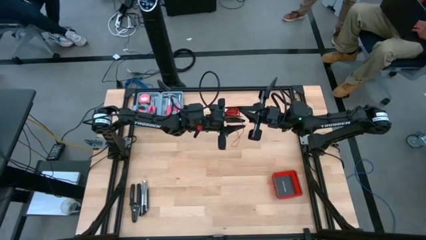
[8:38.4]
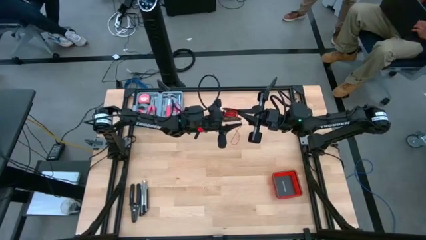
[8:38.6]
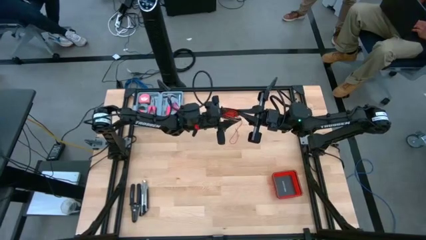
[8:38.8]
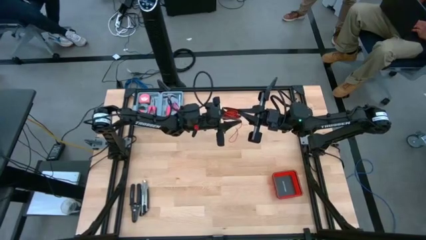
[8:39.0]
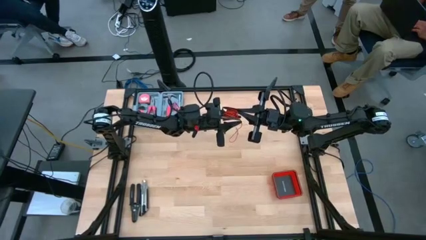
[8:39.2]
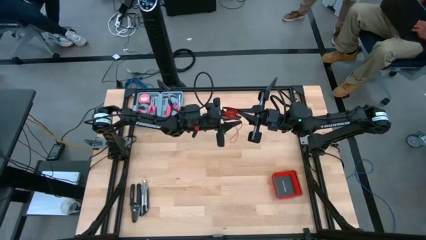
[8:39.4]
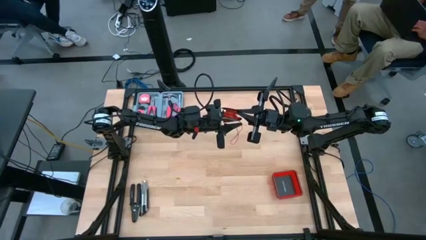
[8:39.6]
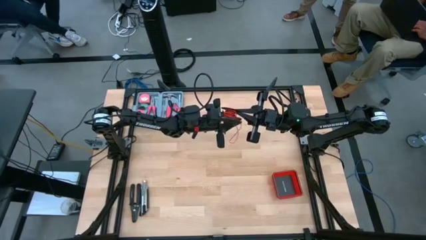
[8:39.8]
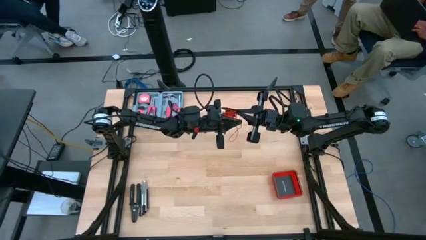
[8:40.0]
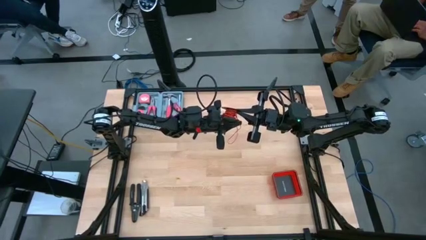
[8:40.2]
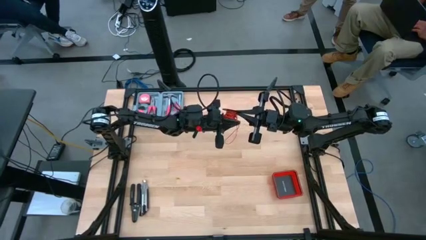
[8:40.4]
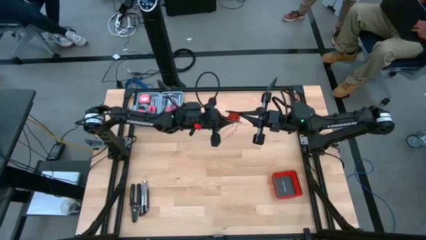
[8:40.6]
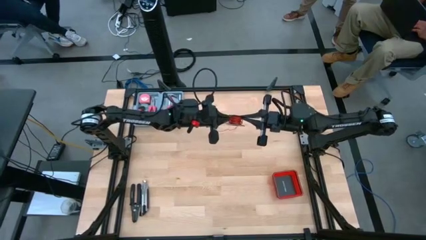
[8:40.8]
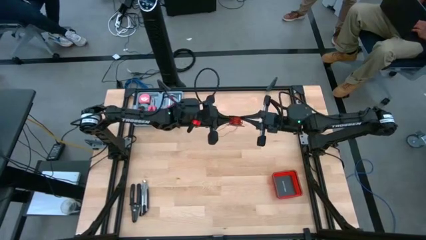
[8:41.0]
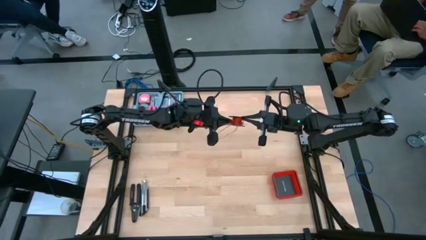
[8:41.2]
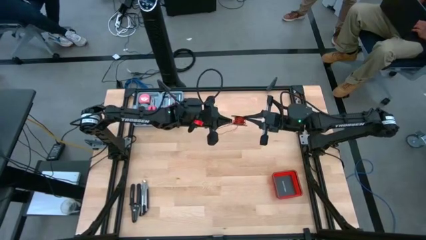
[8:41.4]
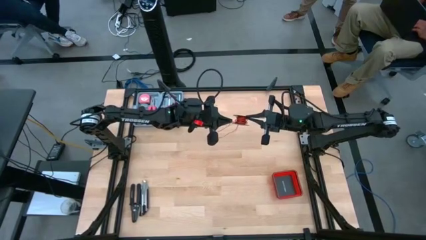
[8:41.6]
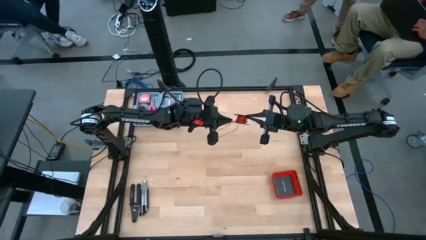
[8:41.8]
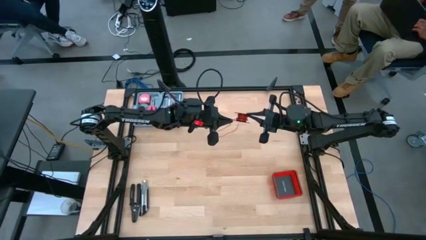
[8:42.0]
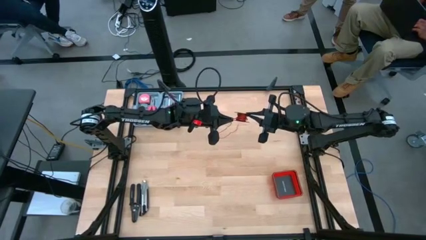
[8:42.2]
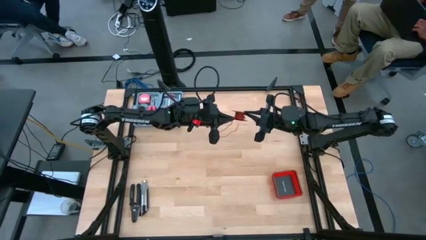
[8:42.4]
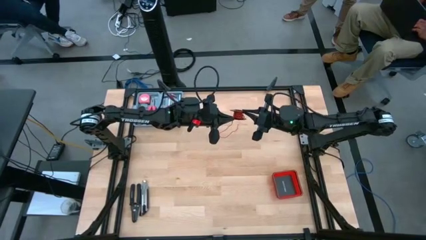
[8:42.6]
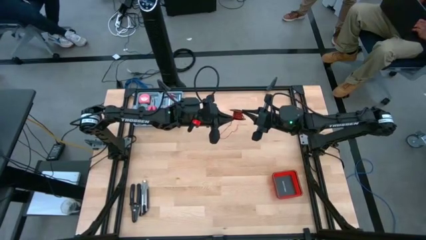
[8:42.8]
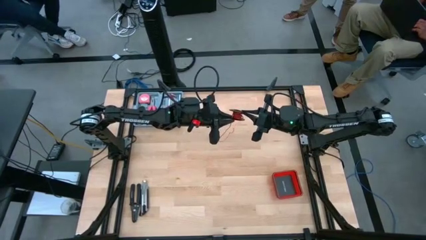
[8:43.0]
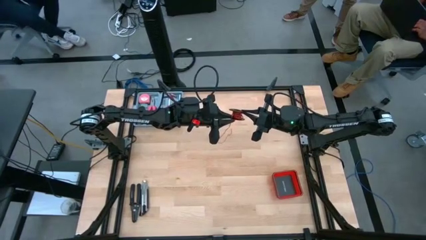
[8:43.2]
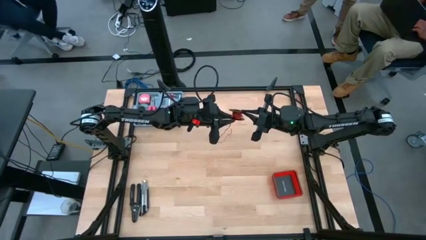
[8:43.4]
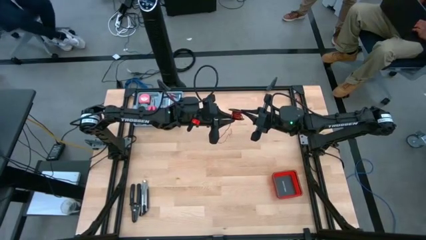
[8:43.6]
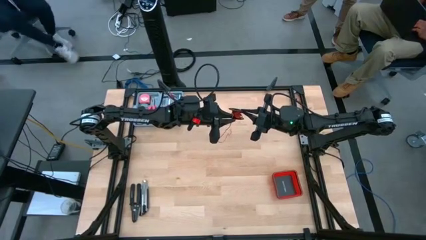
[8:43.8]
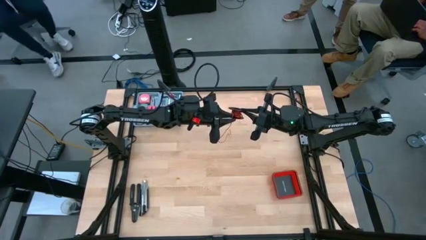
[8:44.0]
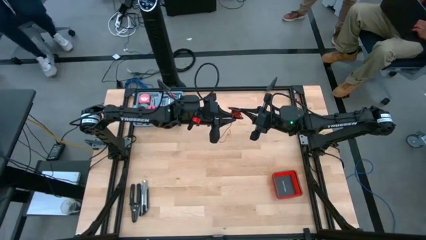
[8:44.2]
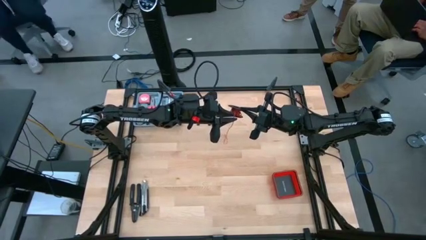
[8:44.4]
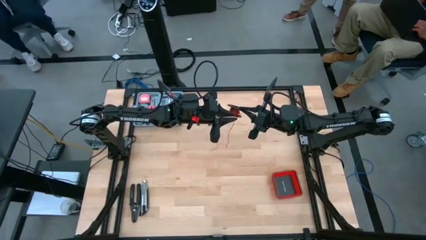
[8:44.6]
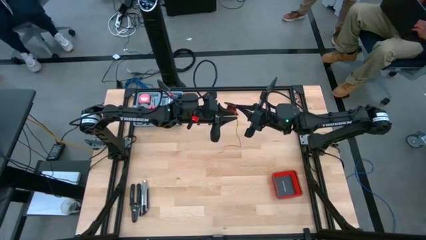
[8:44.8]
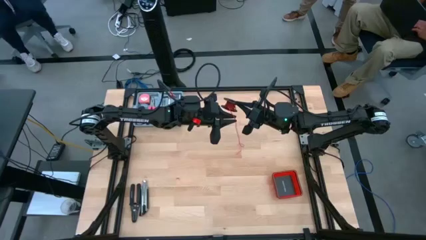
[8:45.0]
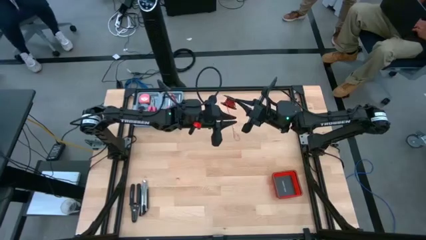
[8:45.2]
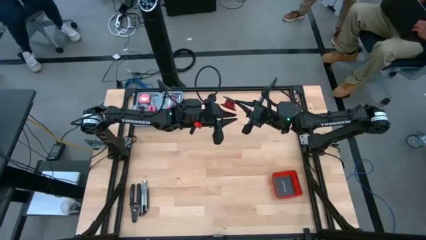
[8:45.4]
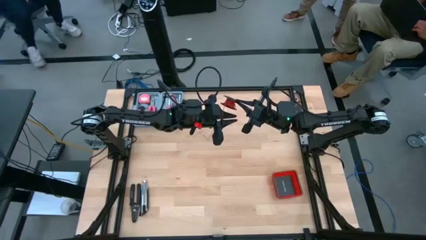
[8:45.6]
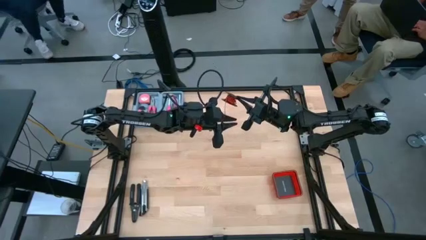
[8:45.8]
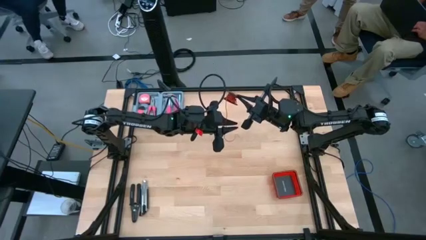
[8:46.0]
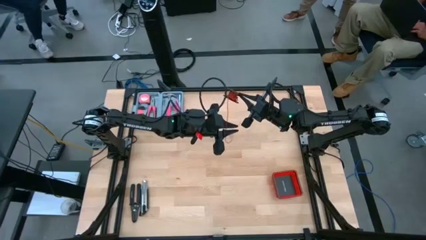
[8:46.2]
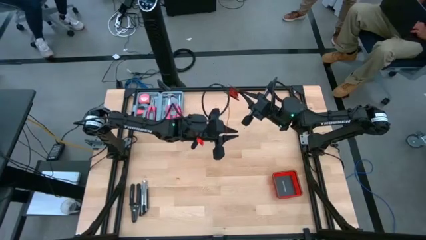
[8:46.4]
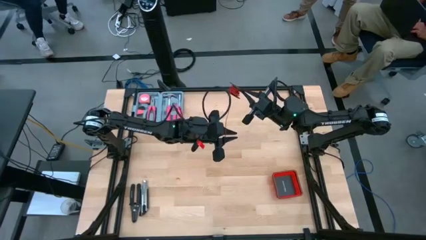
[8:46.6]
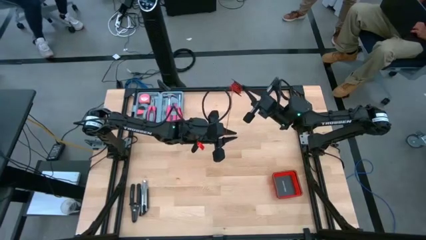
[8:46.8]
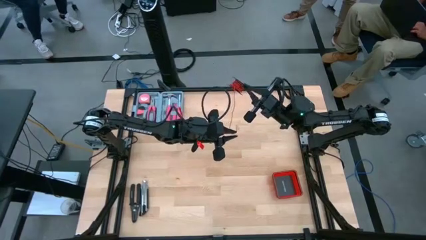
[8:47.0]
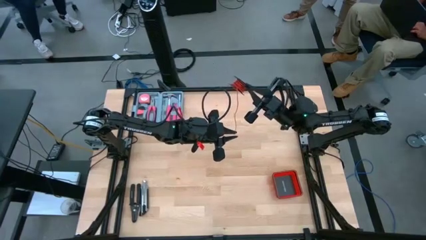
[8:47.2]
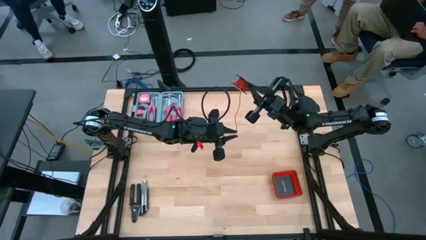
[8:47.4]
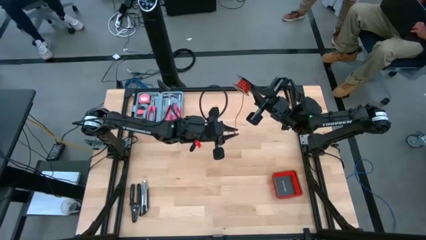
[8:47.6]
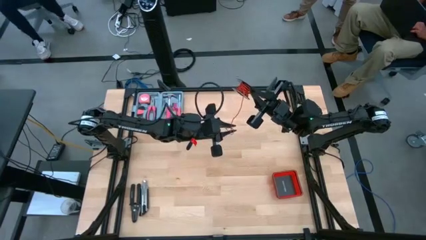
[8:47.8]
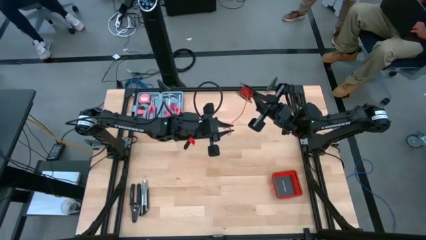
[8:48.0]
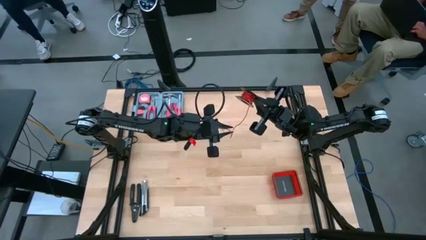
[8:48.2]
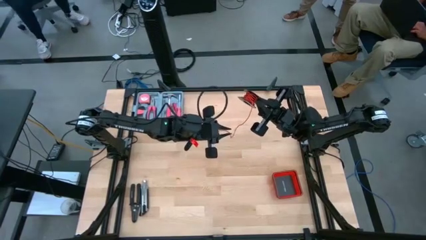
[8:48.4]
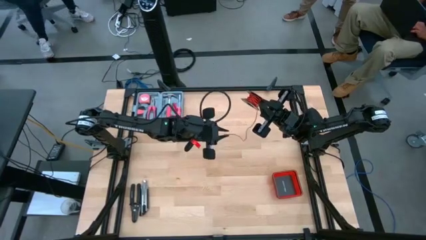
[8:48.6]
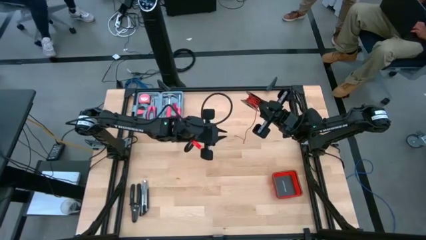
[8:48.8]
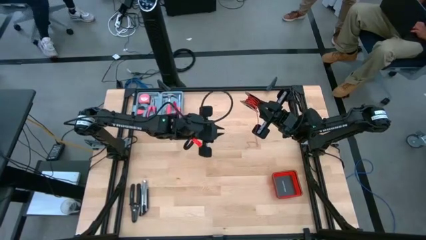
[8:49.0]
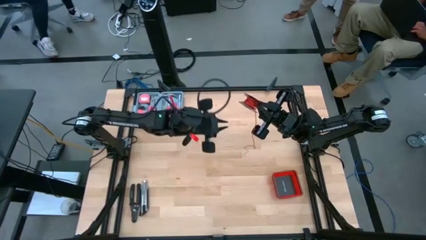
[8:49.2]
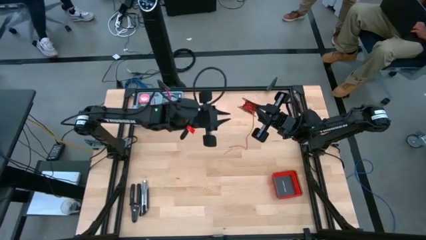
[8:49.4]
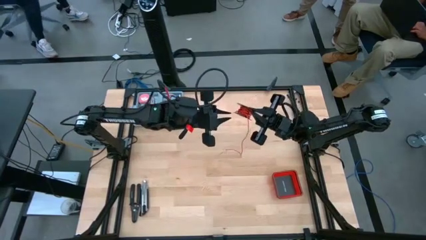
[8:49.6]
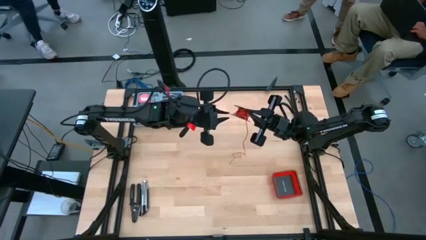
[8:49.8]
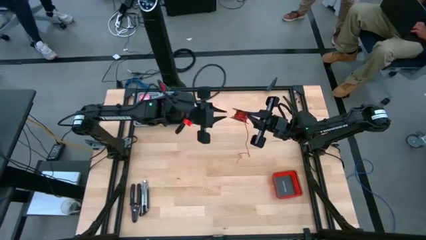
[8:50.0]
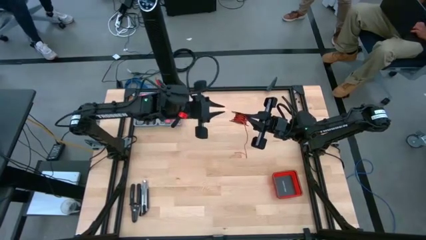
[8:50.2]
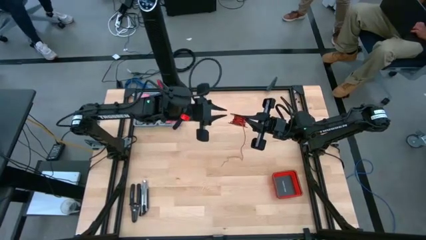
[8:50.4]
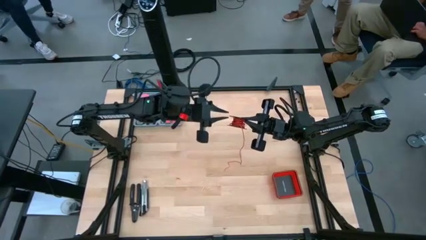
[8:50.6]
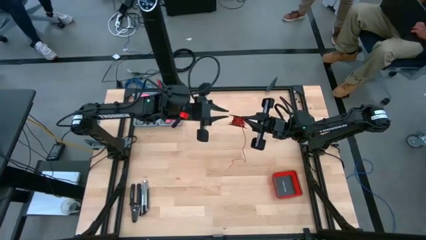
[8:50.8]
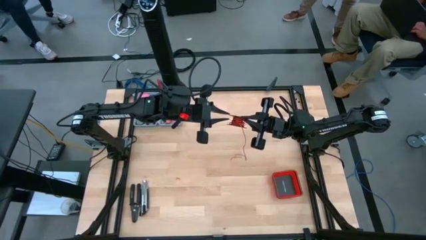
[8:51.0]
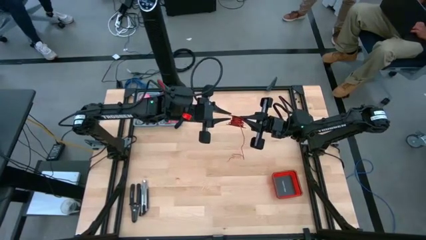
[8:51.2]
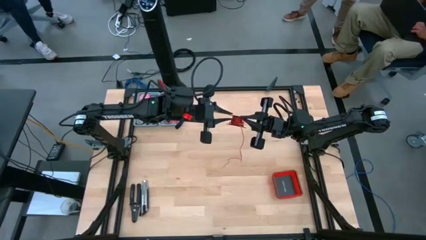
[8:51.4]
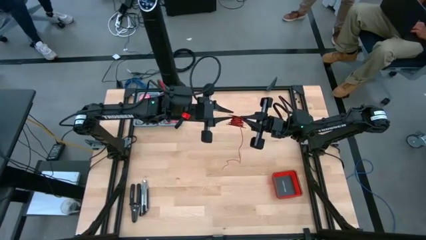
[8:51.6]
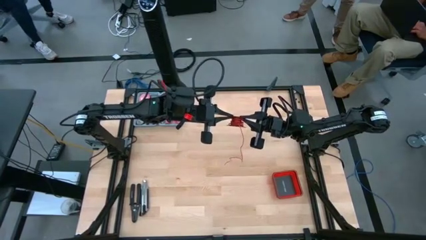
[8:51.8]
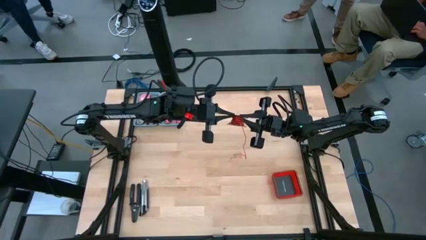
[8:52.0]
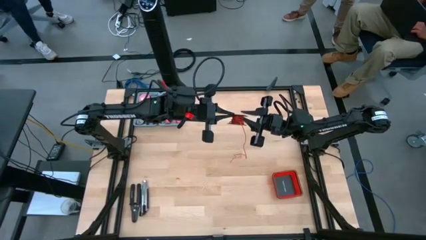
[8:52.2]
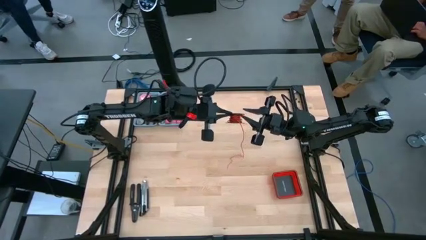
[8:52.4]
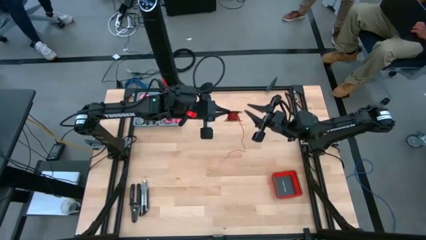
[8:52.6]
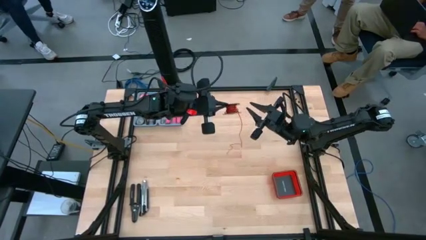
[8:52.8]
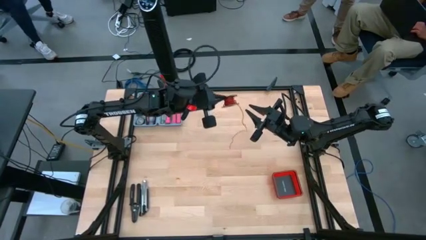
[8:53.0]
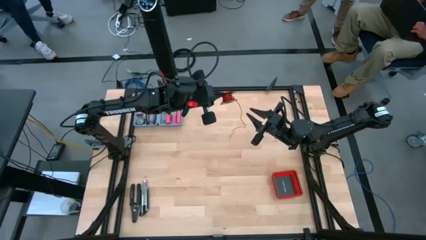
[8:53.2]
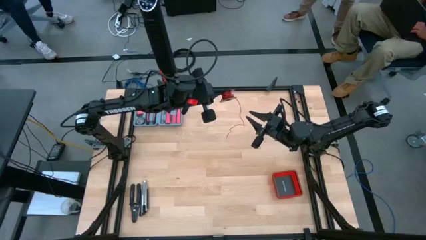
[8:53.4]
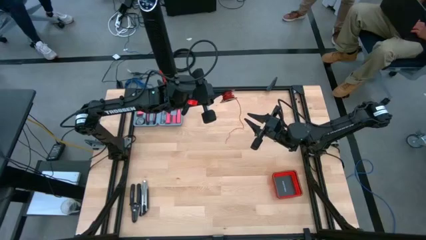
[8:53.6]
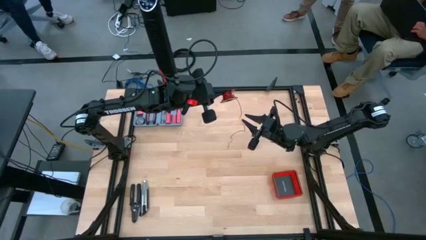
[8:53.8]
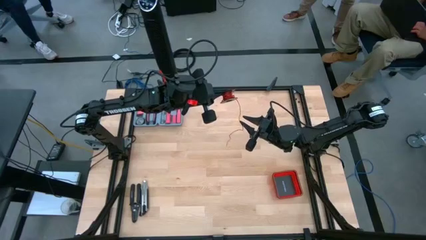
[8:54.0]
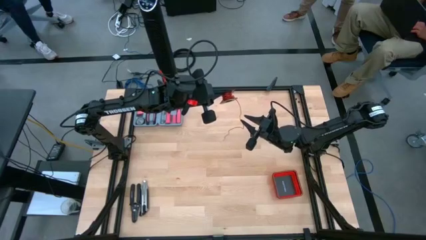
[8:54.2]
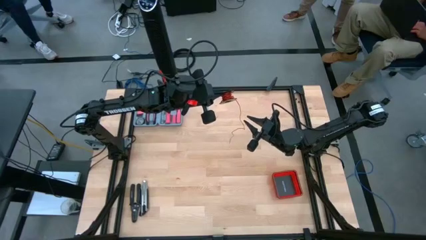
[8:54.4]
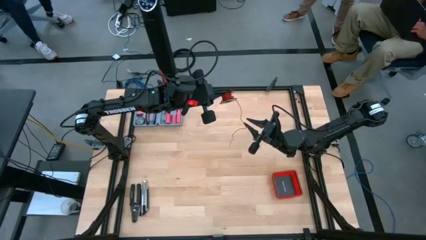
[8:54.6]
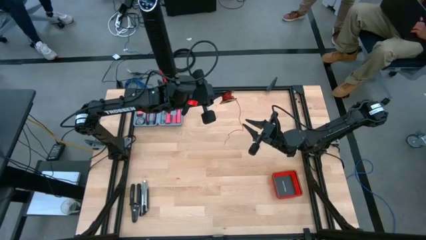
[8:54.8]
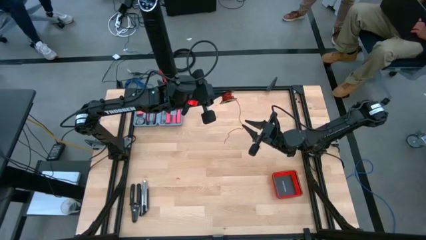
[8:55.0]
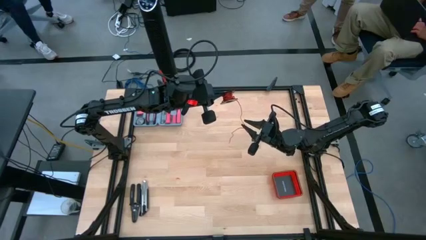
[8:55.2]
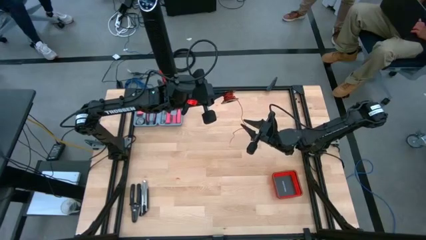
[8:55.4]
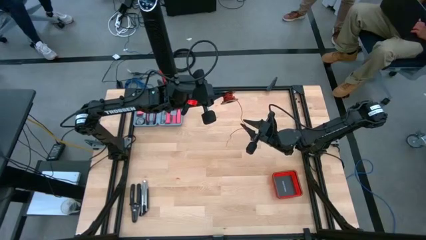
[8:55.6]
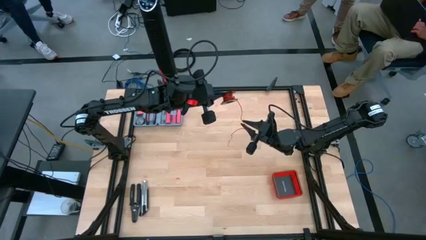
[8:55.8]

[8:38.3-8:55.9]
Task: Coil cords
Coil the red wire onto the spool
